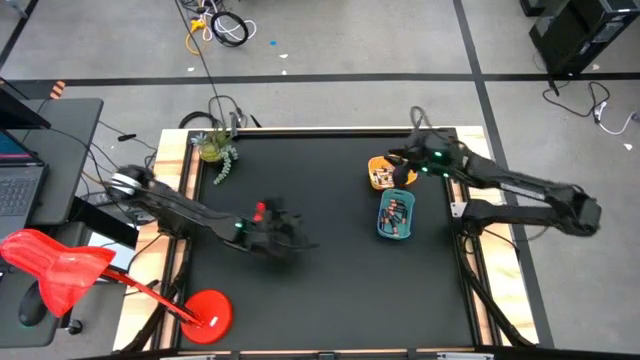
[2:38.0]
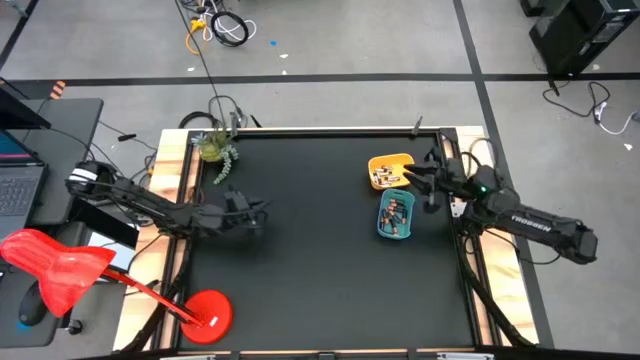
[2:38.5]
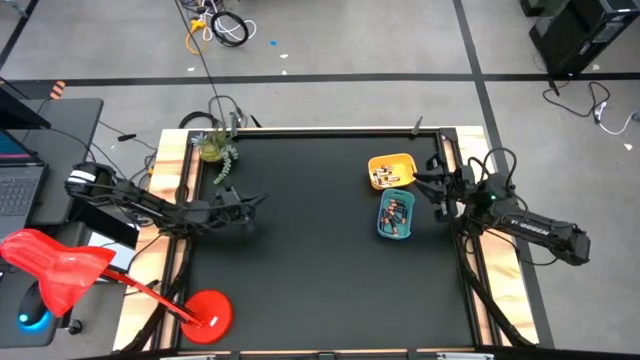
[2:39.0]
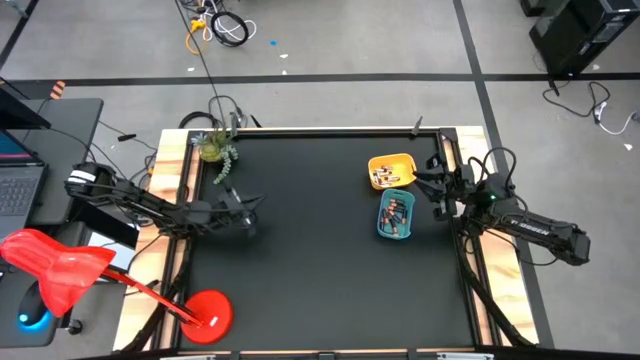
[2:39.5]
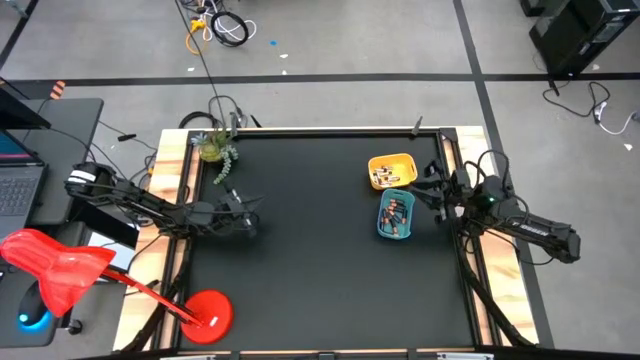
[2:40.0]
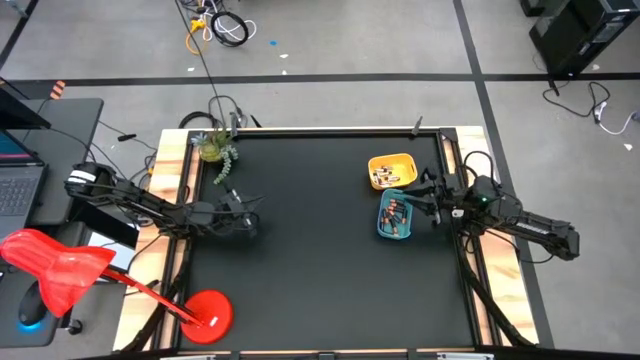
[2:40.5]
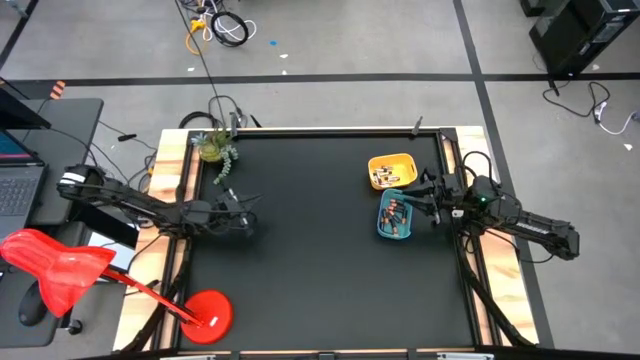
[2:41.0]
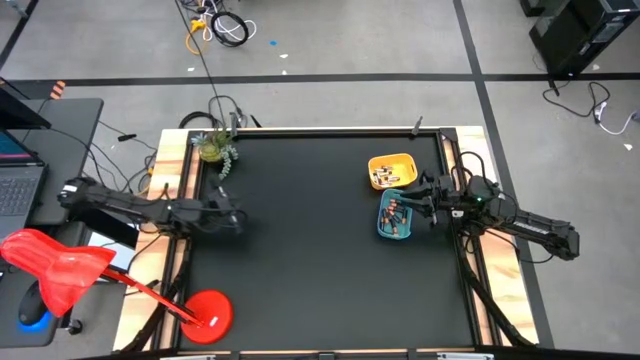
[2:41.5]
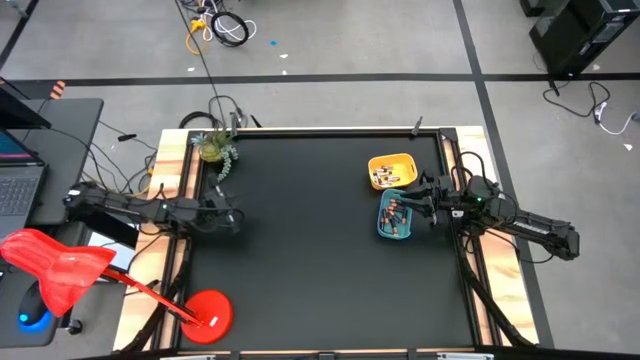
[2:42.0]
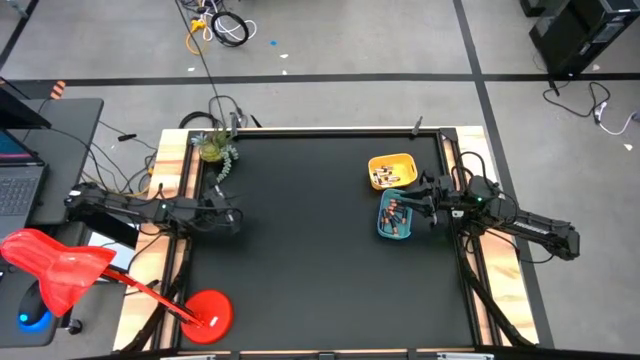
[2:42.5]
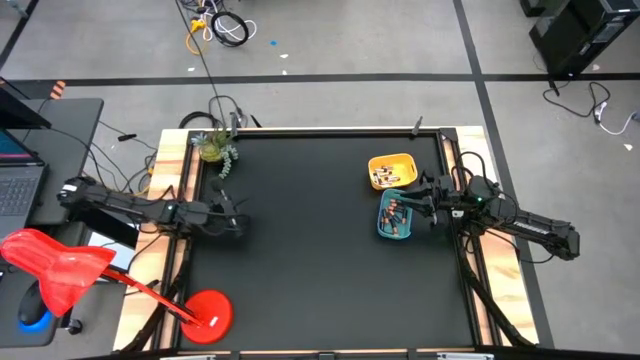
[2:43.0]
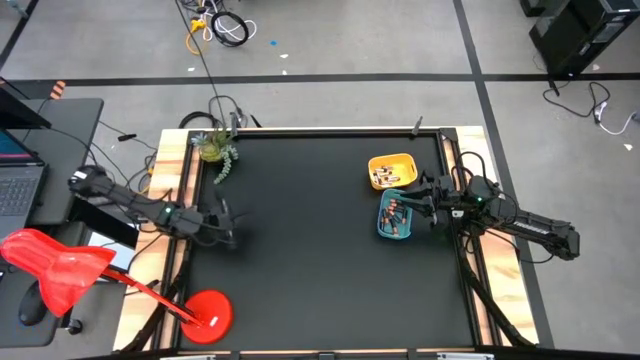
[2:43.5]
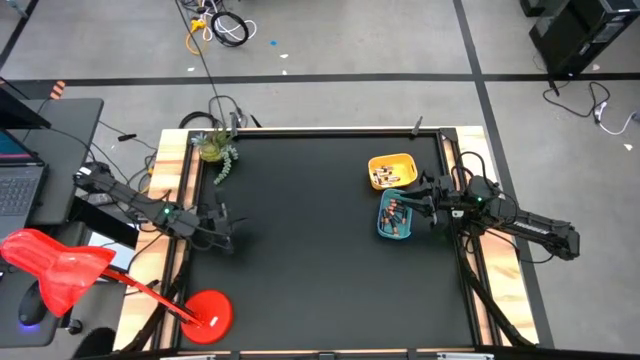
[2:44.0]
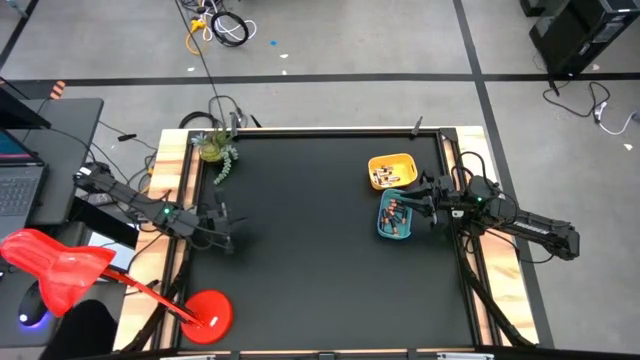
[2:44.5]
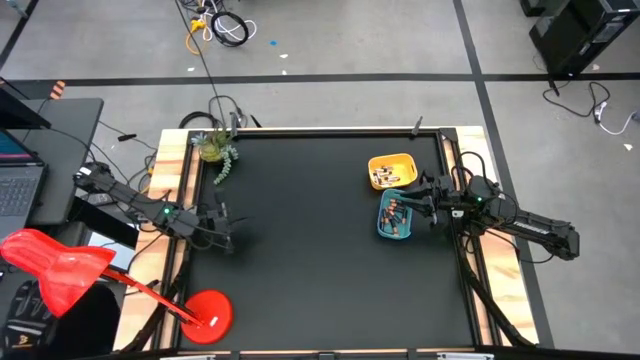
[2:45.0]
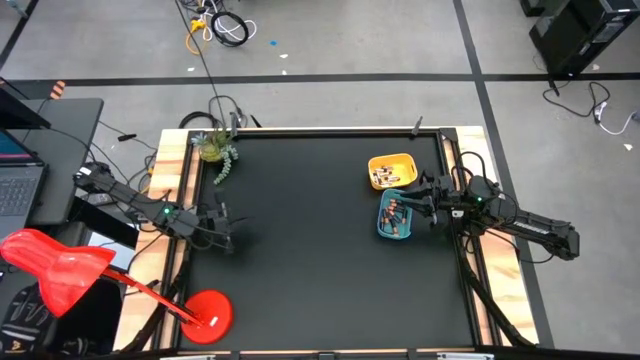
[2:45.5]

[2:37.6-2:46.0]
Task: Sort batteries
Return to Home Position

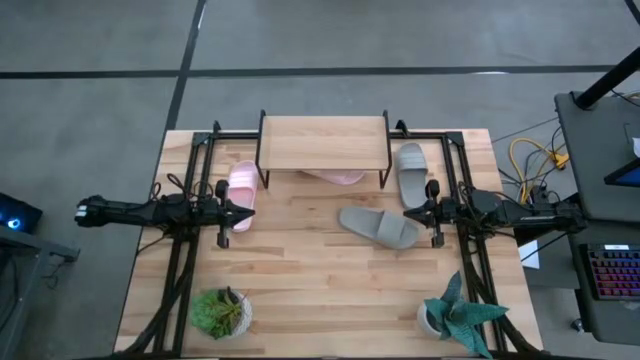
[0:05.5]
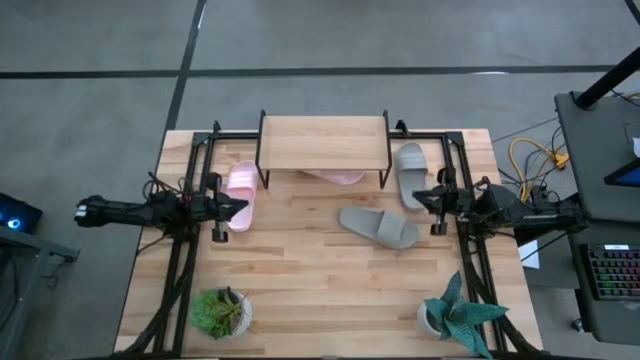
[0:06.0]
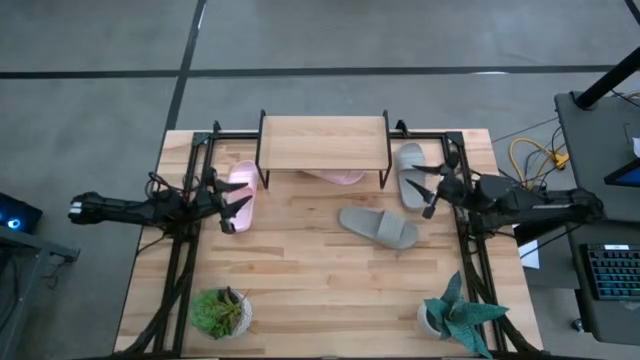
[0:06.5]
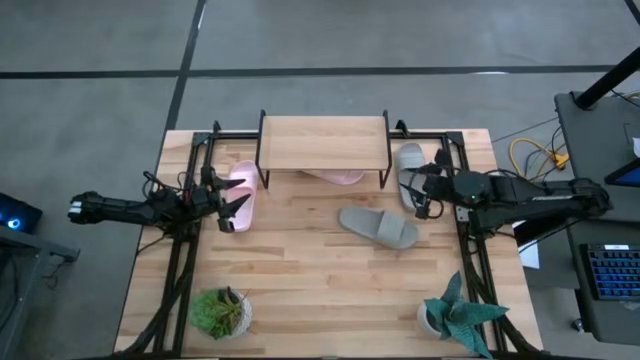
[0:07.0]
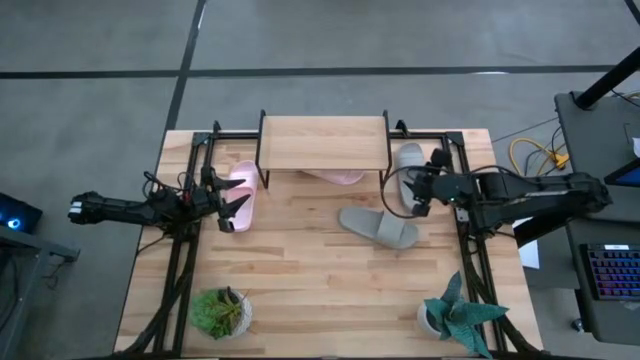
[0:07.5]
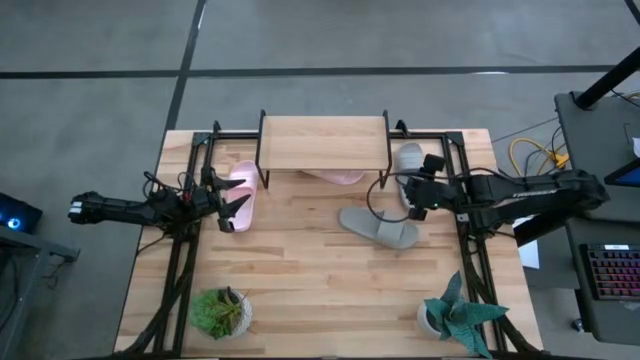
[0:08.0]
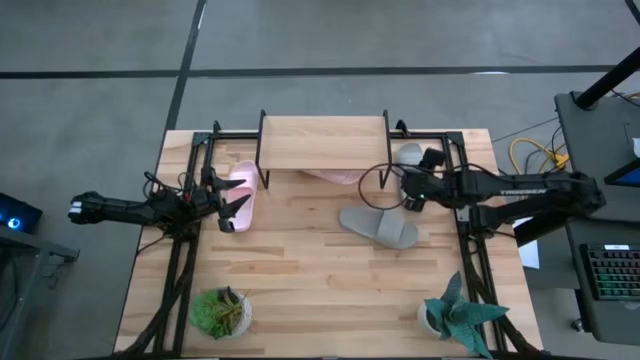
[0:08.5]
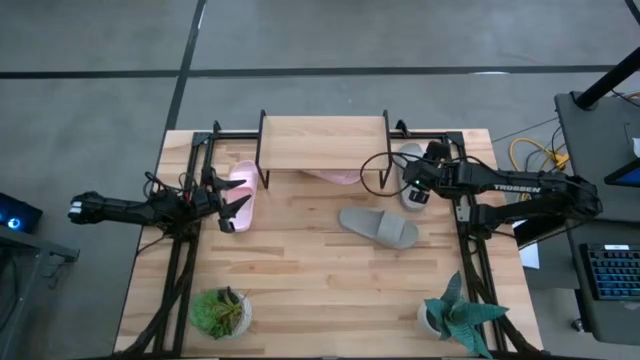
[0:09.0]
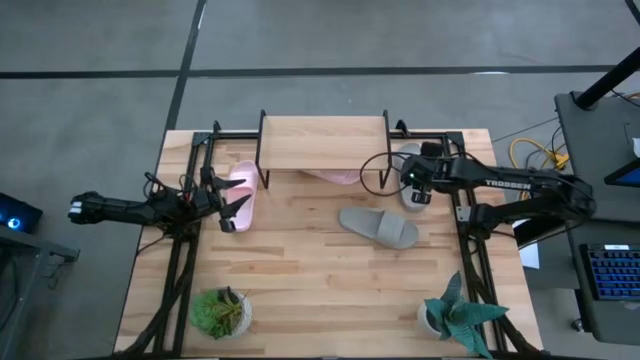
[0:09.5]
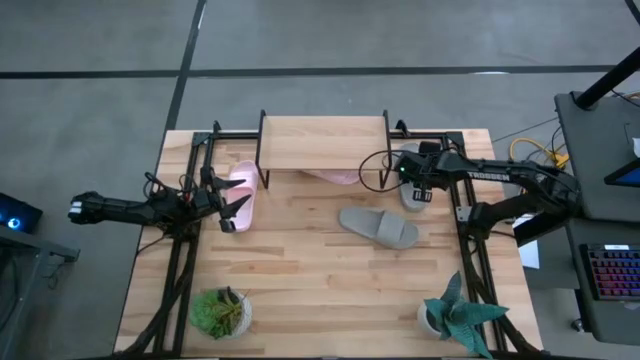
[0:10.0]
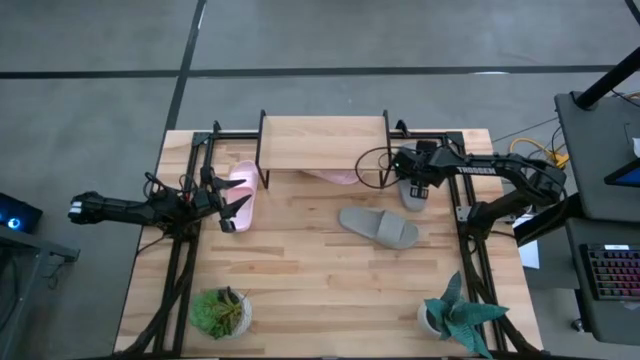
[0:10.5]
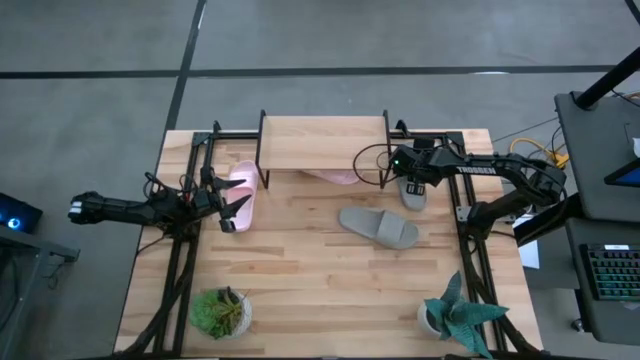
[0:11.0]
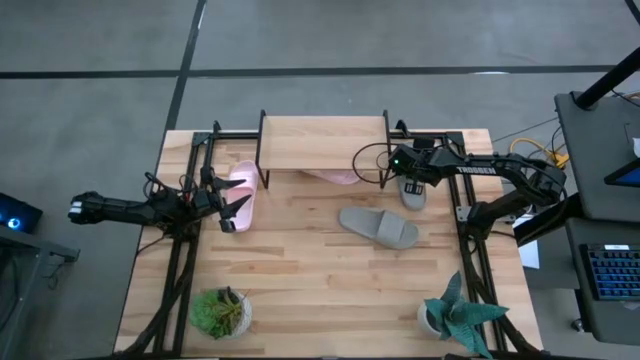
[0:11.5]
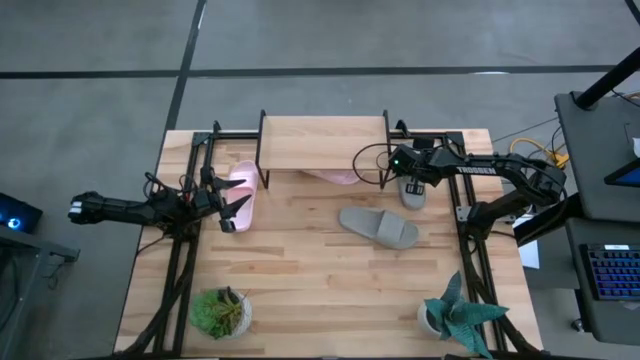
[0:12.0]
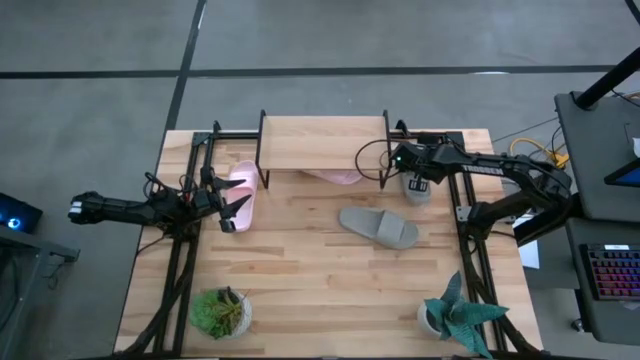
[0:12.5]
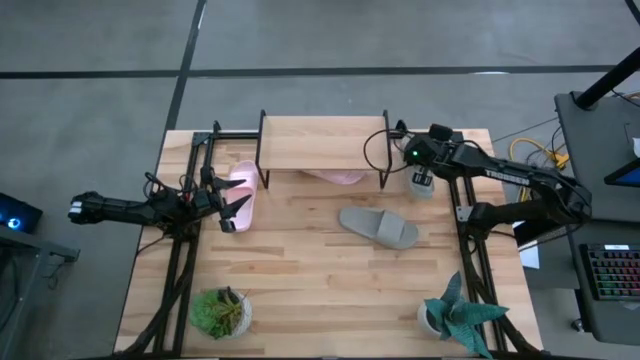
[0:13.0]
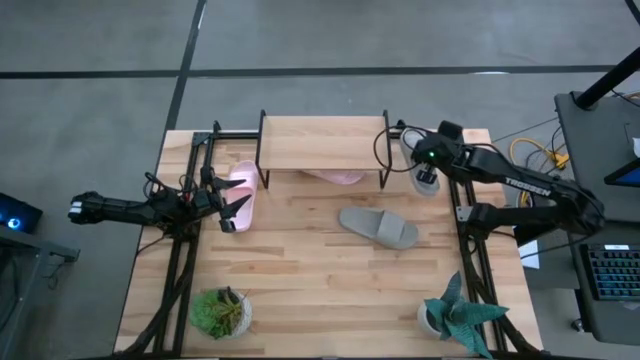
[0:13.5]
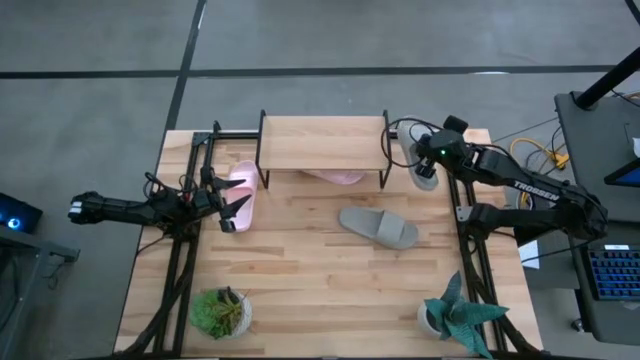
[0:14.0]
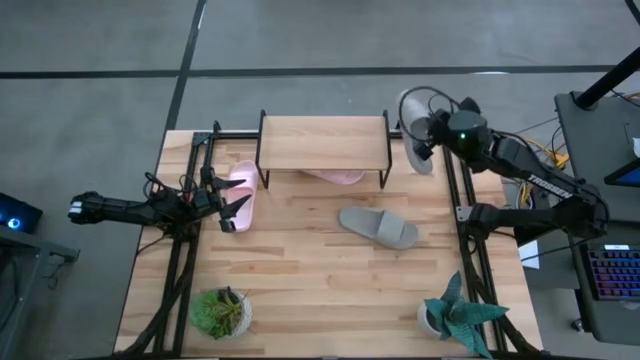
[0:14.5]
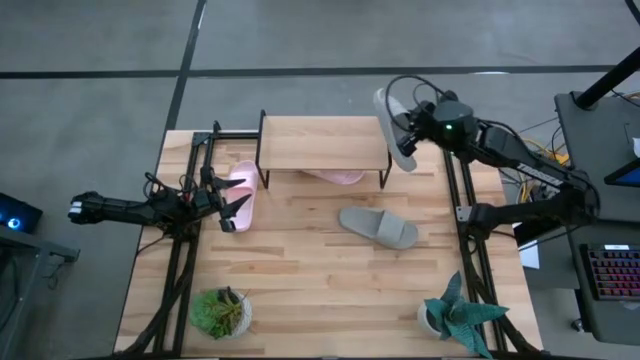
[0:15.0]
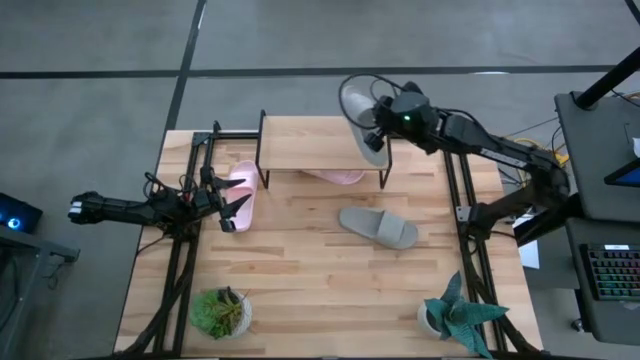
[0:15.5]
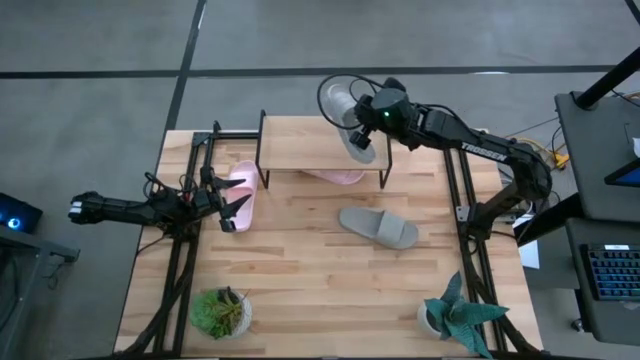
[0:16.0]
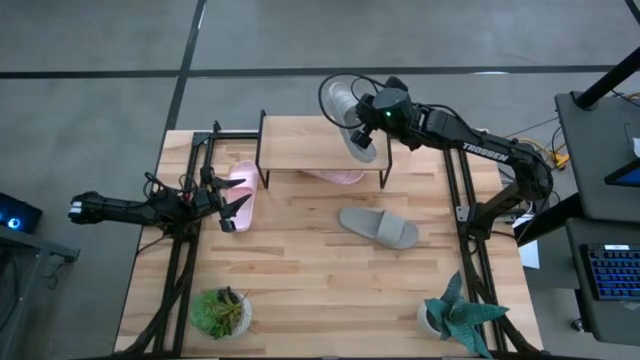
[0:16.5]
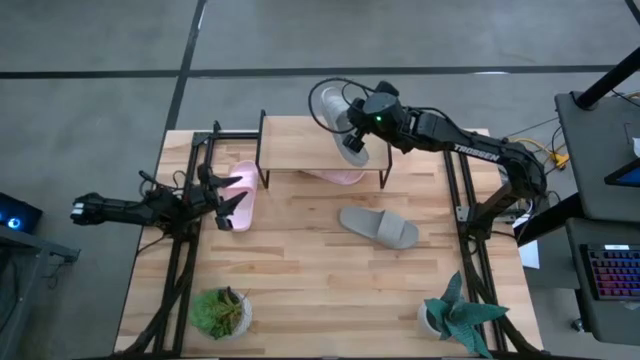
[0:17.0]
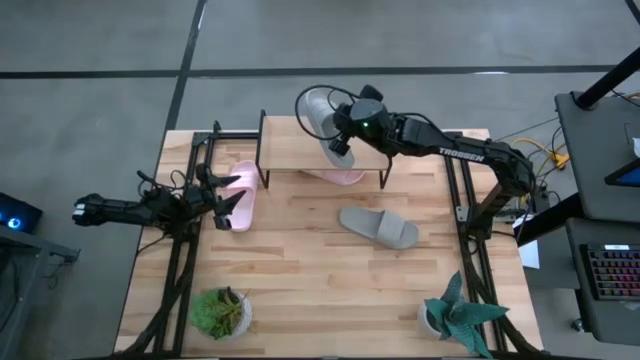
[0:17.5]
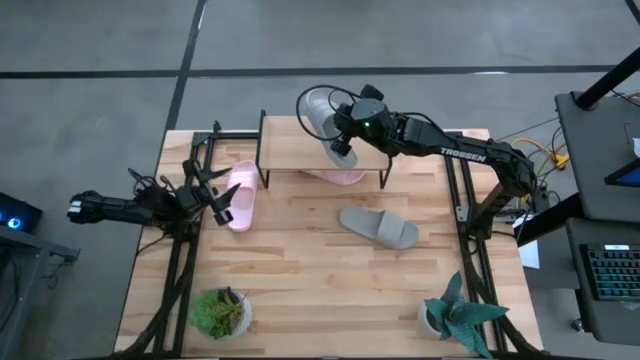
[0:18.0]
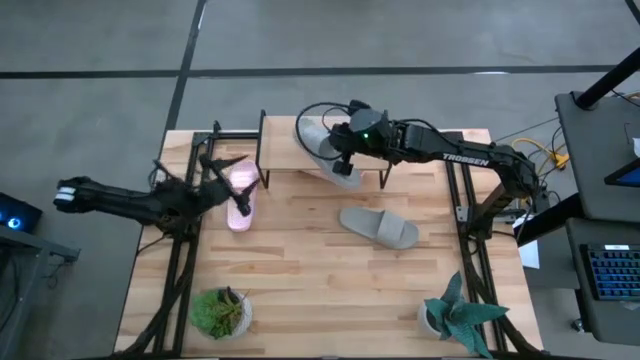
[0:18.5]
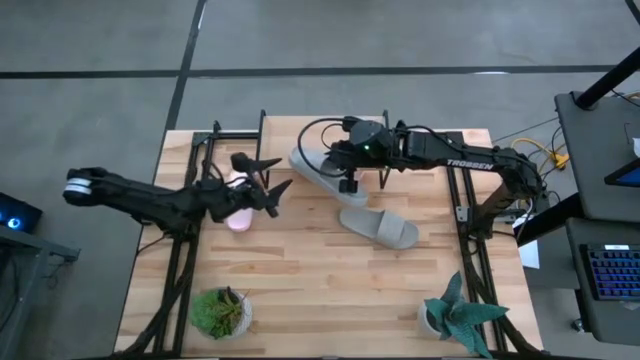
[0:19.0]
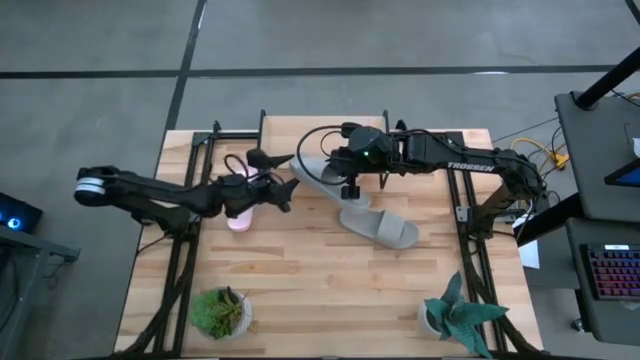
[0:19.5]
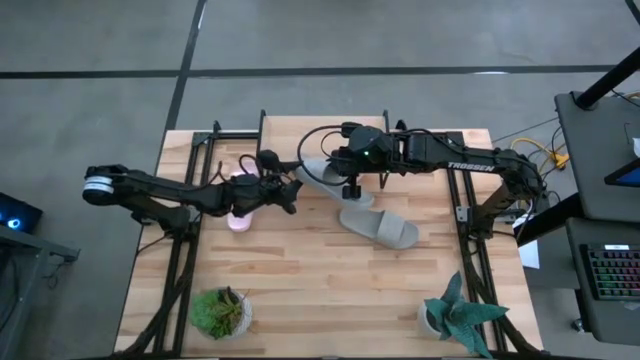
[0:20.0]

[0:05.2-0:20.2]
Task: Pick and place slides into the shelf
Put the top gray slipper on the shelf
